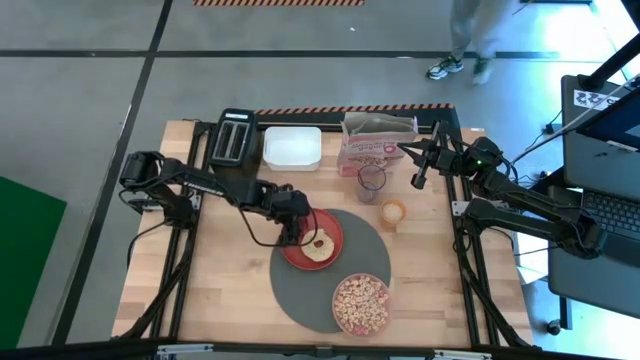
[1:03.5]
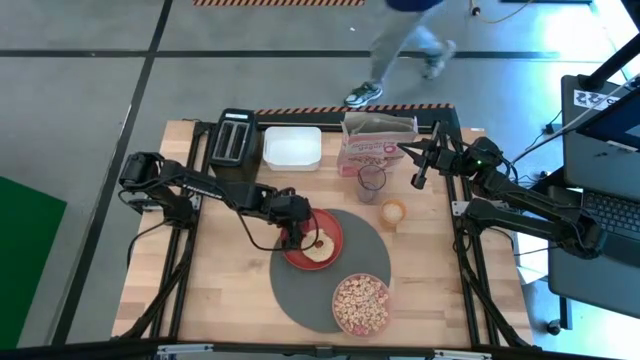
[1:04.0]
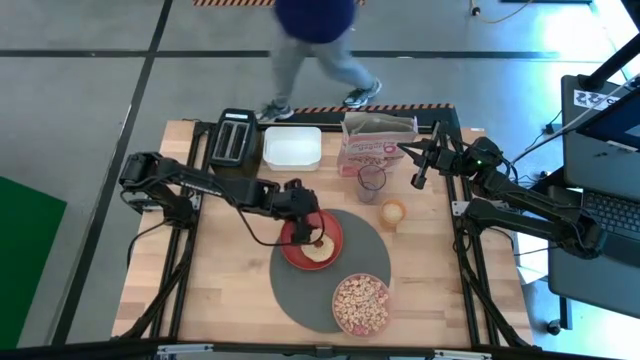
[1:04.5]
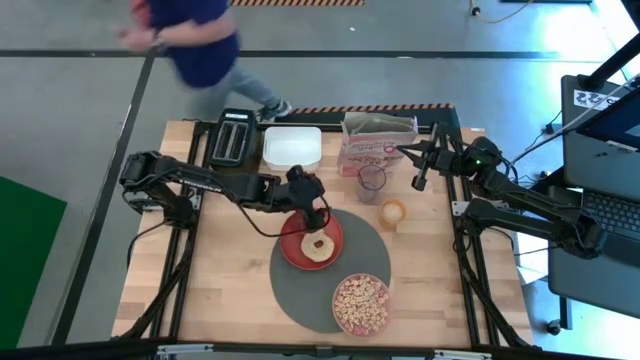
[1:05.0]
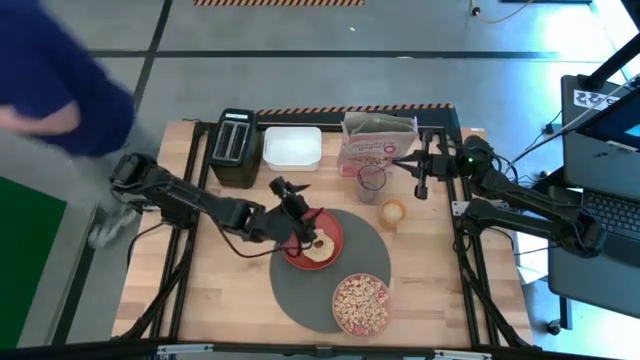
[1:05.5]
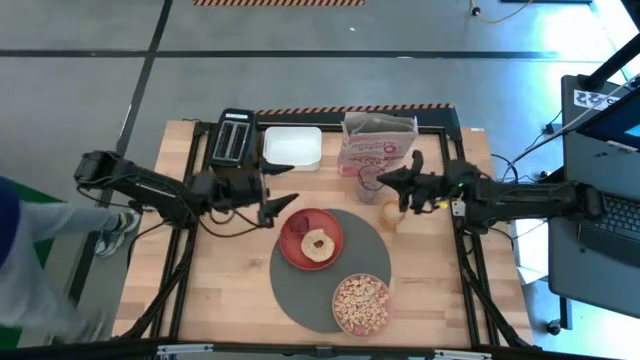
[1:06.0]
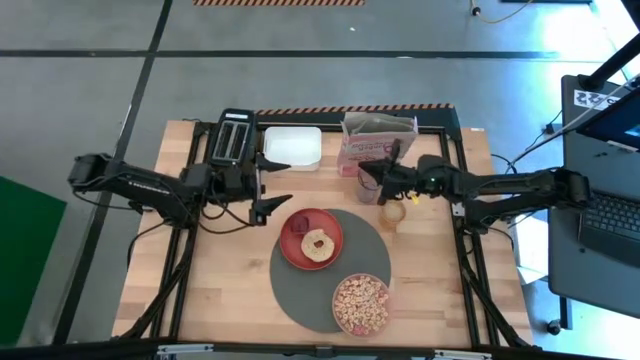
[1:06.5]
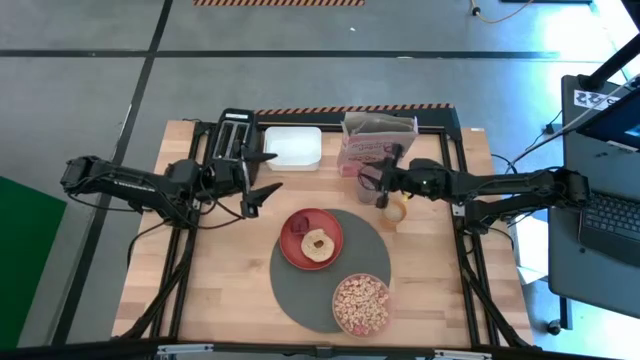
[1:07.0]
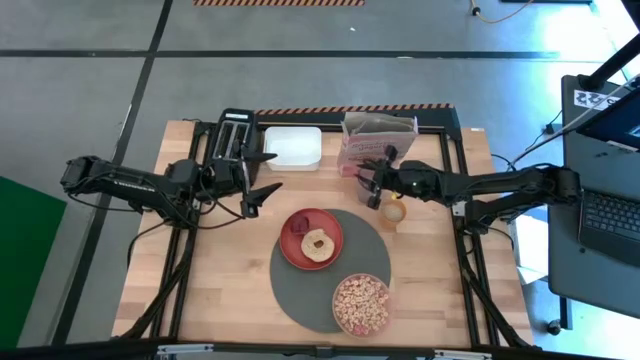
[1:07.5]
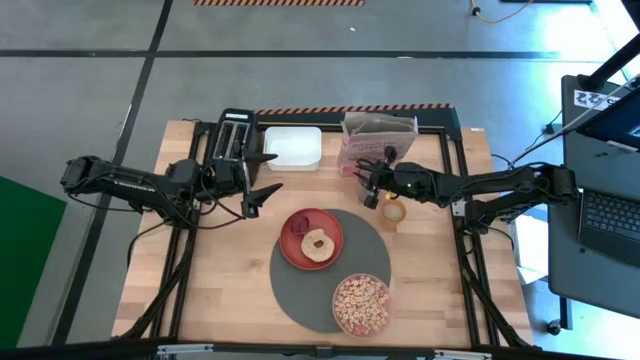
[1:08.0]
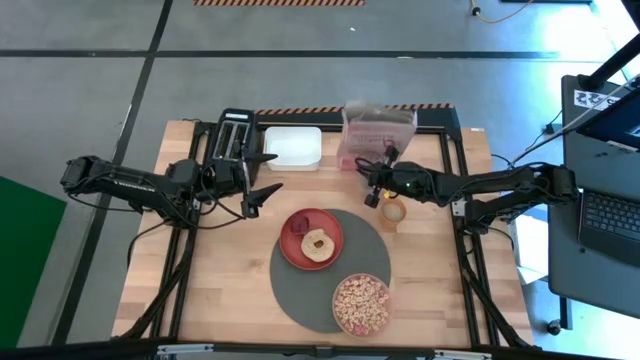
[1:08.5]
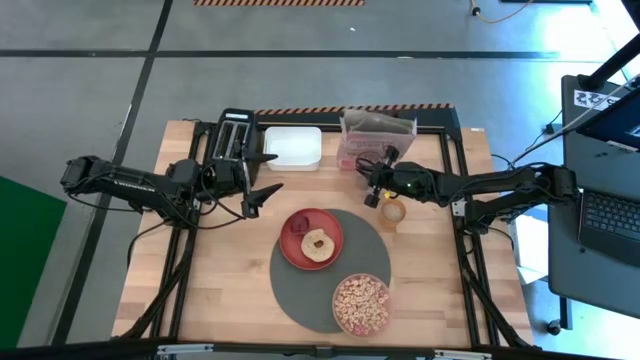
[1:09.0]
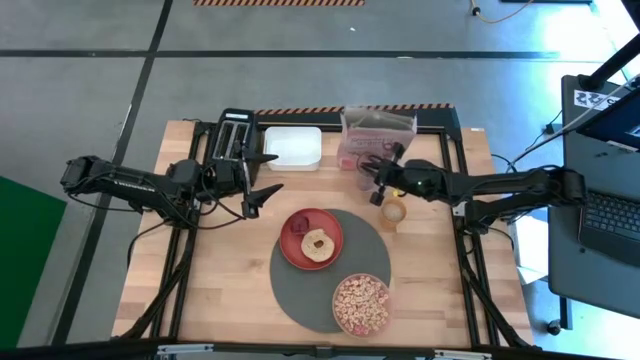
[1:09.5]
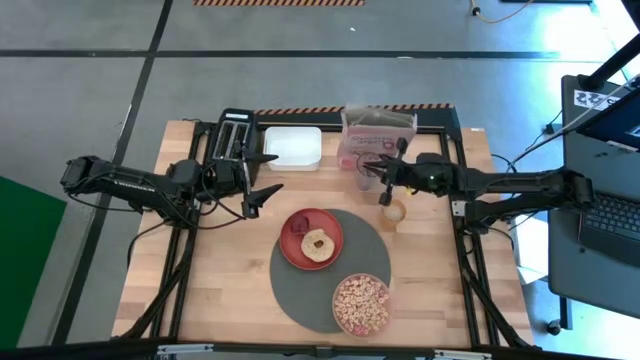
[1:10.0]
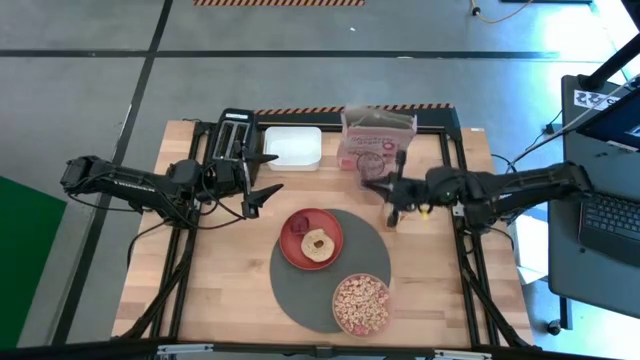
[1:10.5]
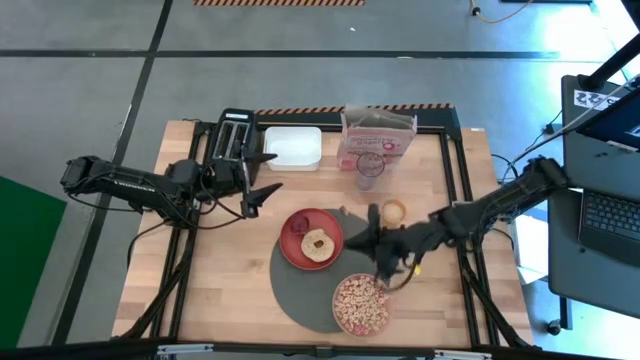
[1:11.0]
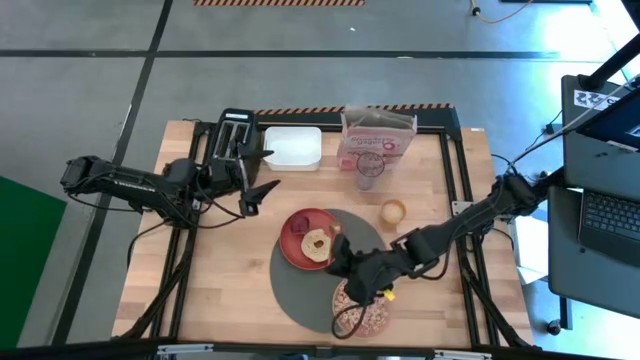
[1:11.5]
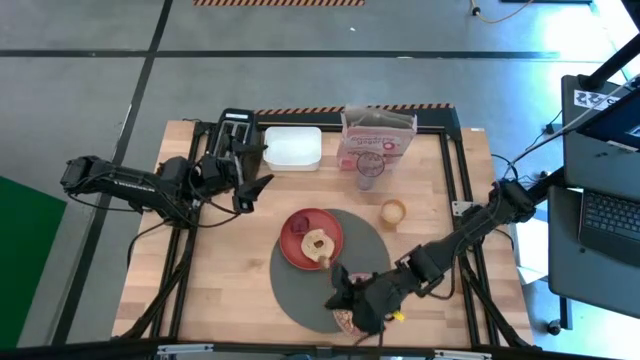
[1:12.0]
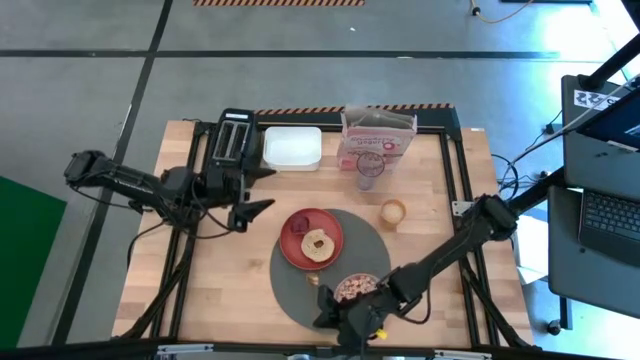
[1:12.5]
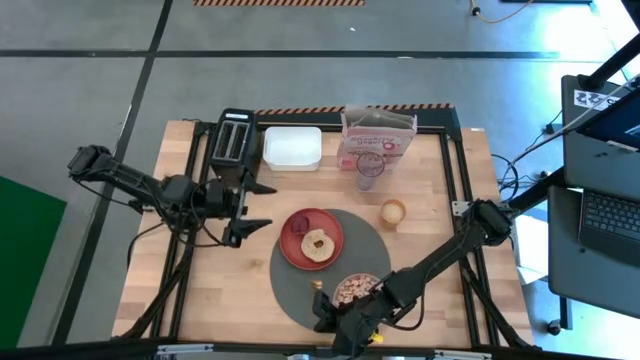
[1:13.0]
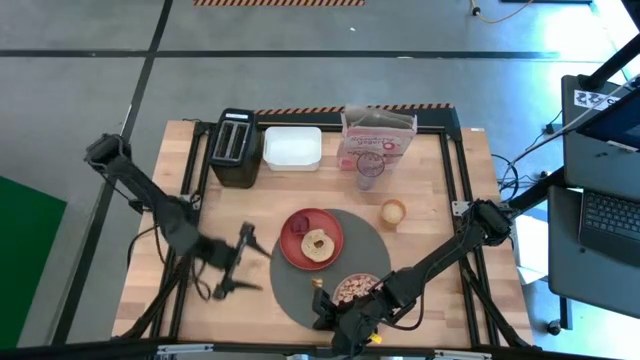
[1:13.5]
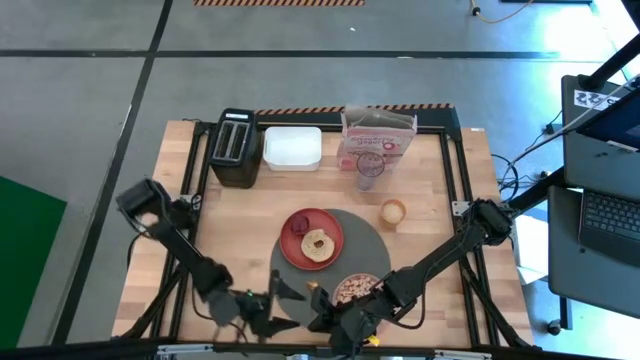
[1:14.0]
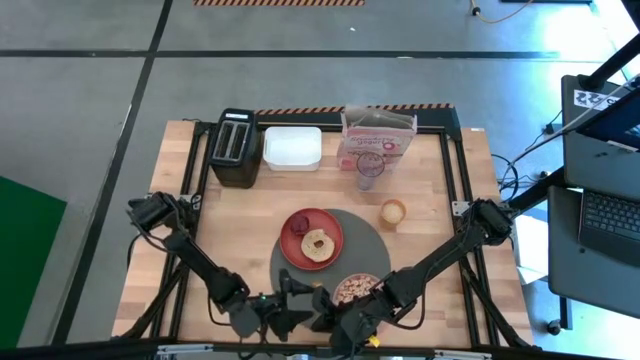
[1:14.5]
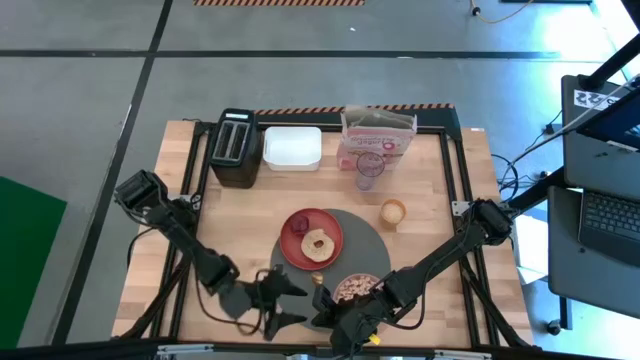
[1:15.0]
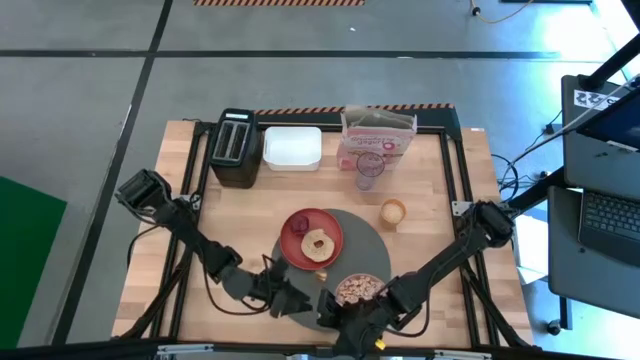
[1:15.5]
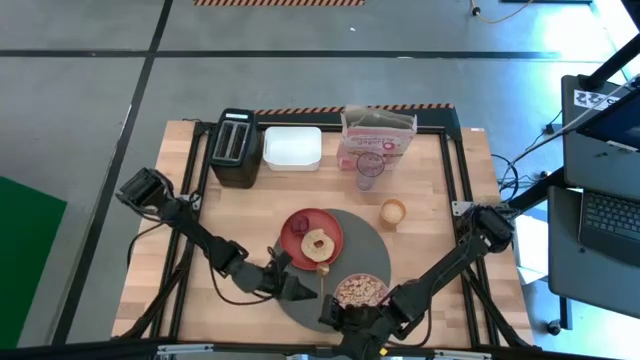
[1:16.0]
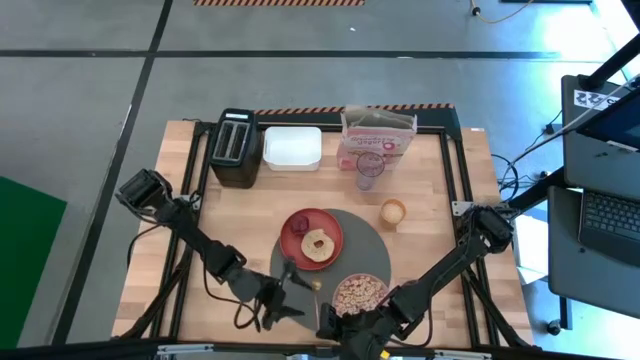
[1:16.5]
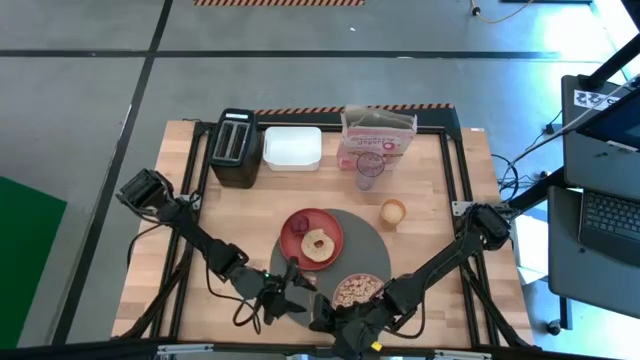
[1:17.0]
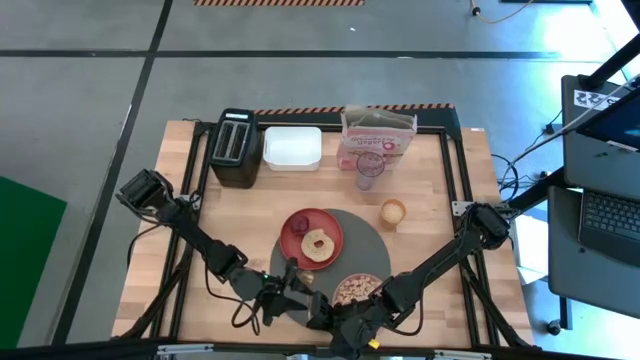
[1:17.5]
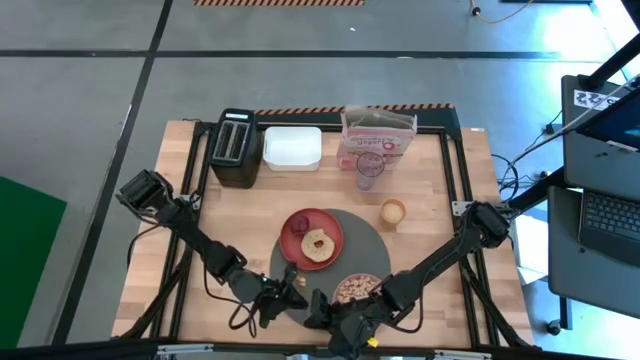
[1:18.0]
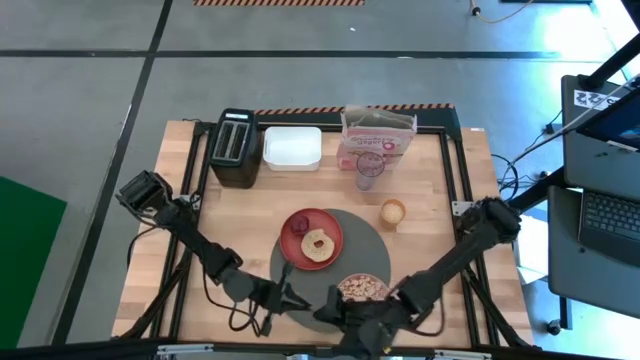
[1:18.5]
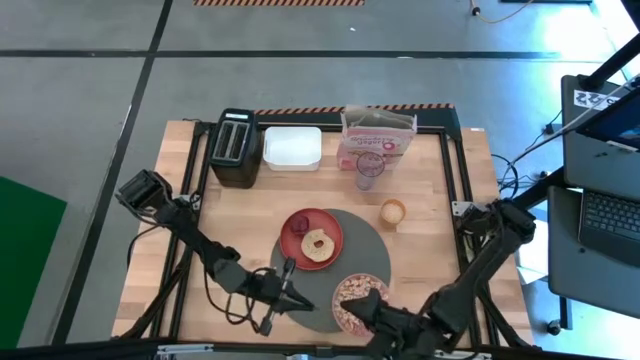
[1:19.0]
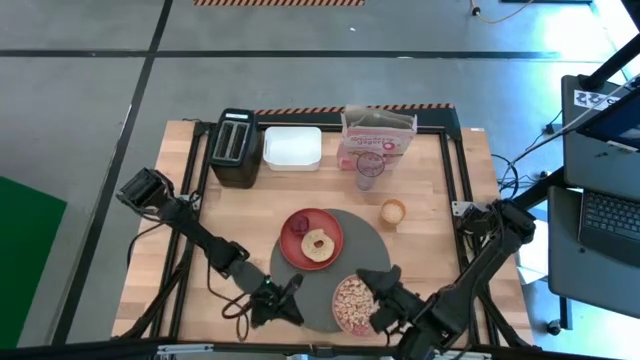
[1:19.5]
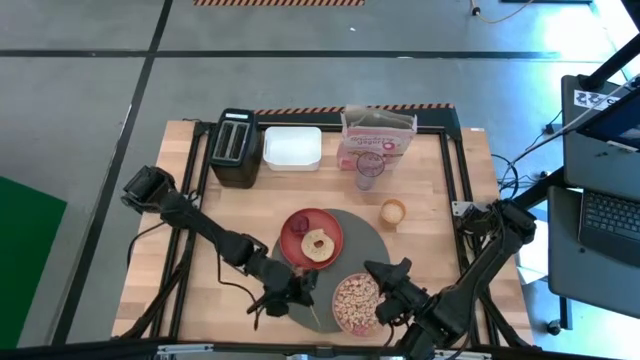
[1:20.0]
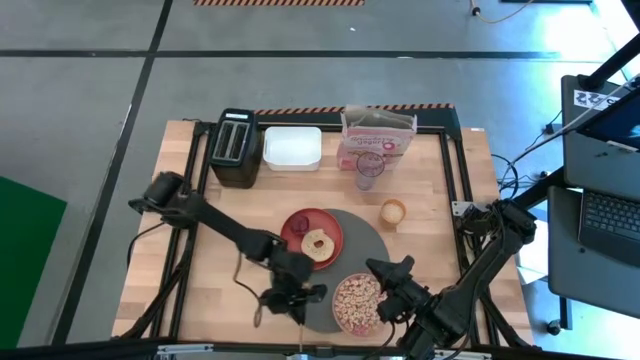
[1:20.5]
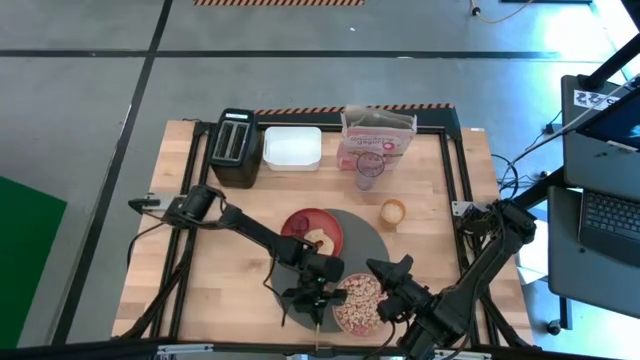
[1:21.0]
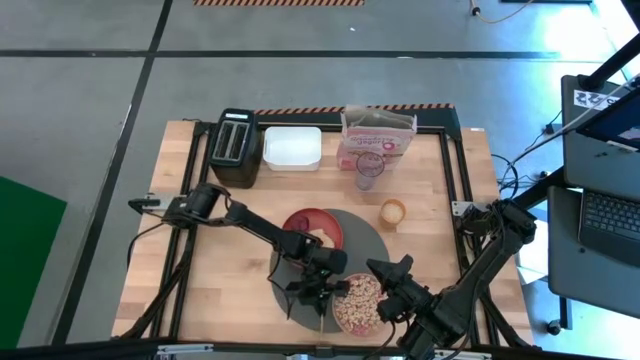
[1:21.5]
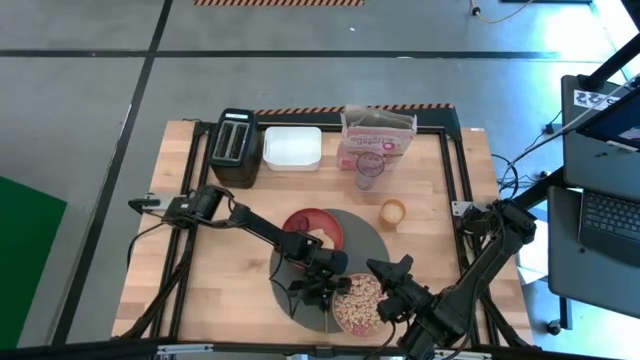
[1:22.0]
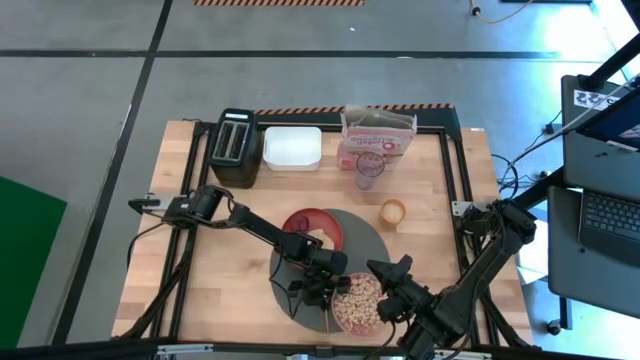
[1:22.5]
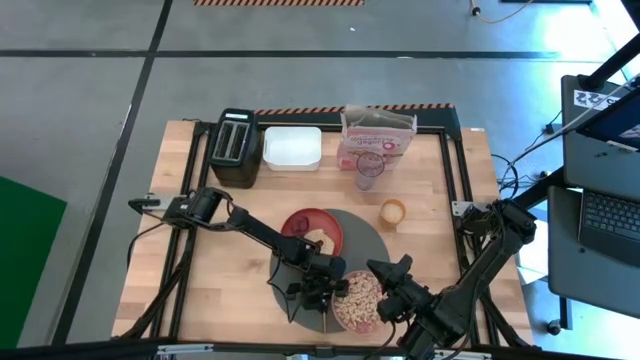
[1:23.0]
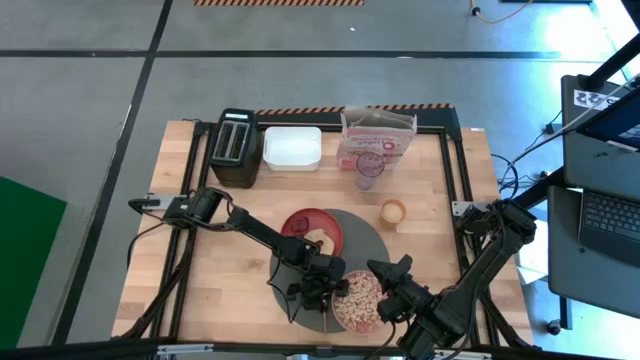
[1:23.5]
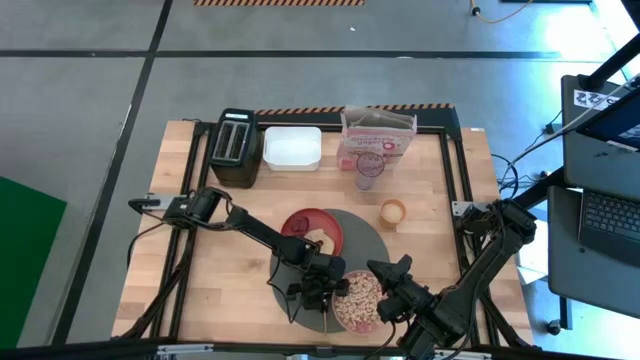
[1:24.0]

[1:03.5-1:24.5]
Task: Arrange a breakfast setting
Put the spoon on the gray place mat
